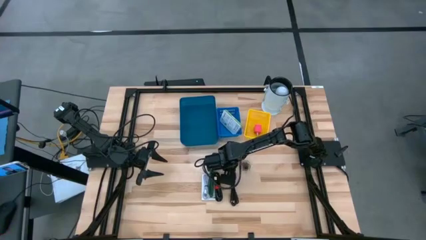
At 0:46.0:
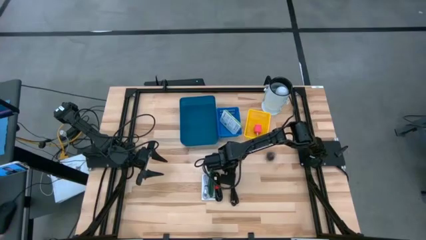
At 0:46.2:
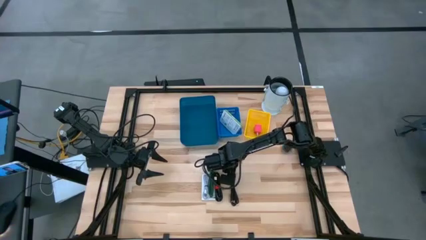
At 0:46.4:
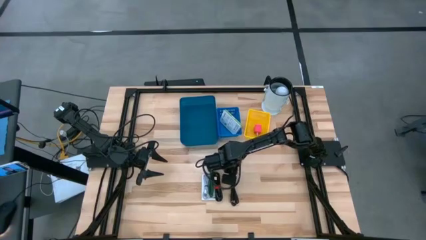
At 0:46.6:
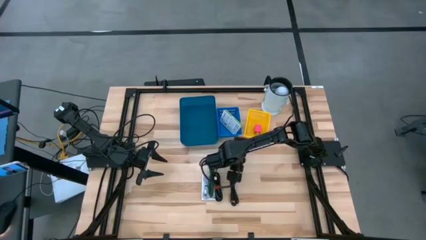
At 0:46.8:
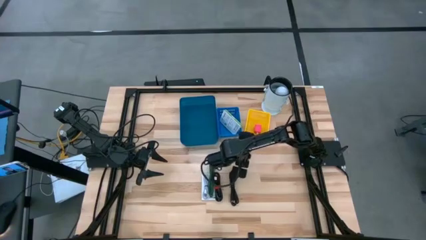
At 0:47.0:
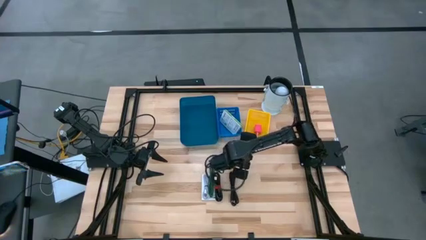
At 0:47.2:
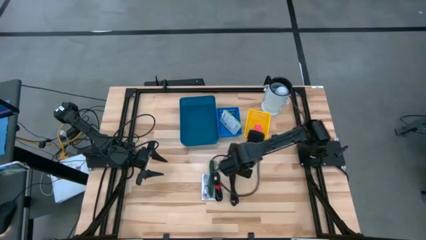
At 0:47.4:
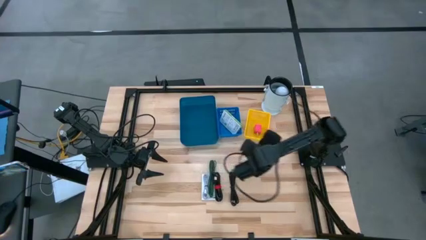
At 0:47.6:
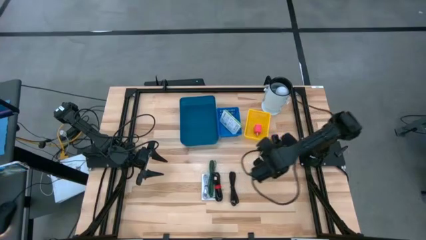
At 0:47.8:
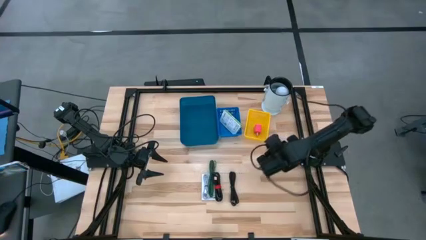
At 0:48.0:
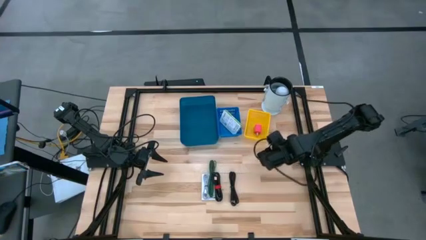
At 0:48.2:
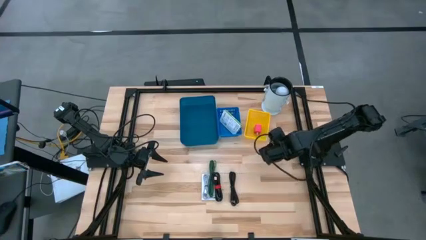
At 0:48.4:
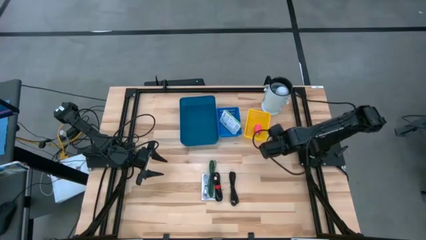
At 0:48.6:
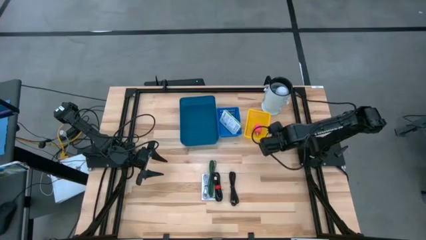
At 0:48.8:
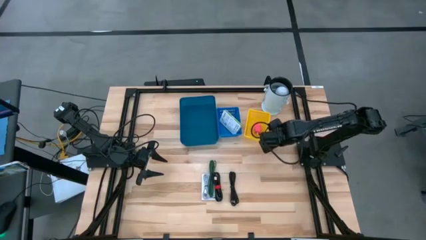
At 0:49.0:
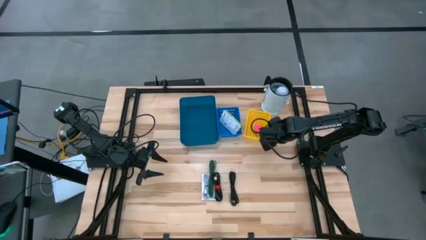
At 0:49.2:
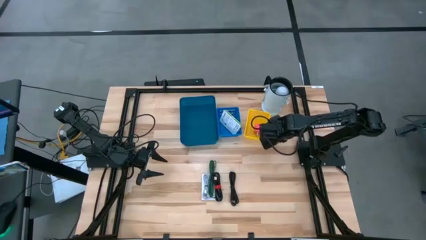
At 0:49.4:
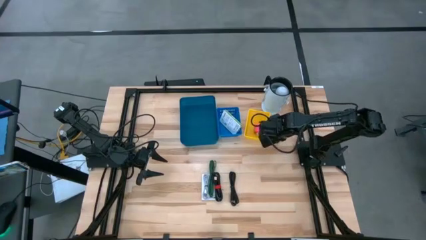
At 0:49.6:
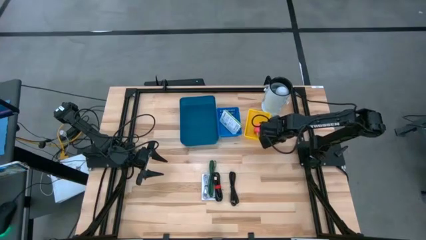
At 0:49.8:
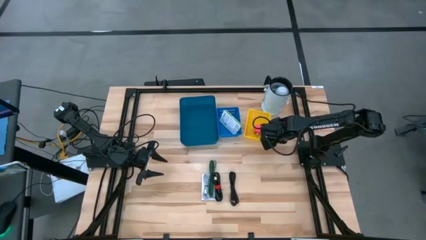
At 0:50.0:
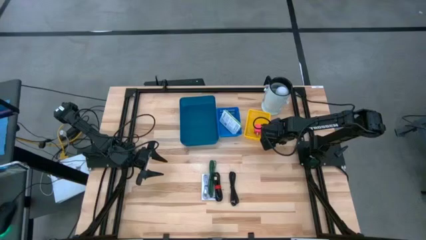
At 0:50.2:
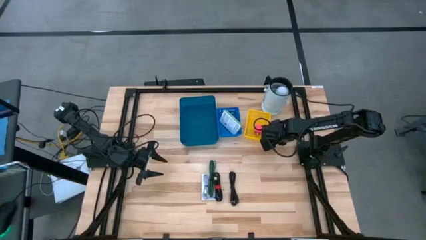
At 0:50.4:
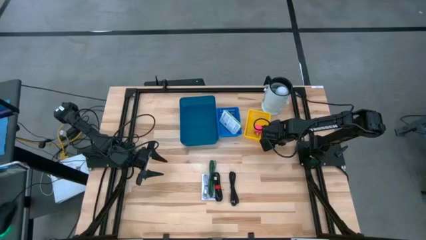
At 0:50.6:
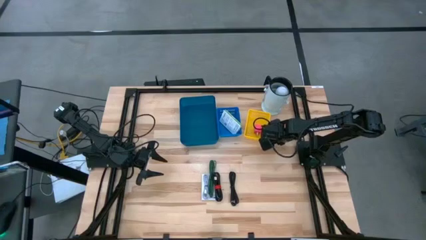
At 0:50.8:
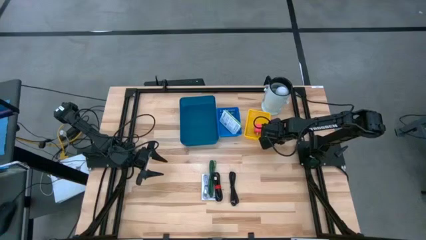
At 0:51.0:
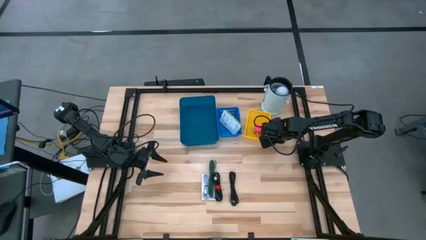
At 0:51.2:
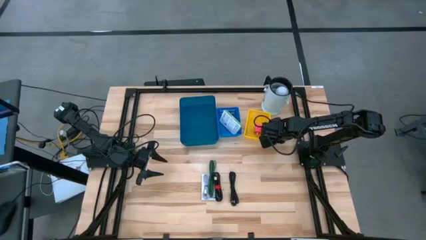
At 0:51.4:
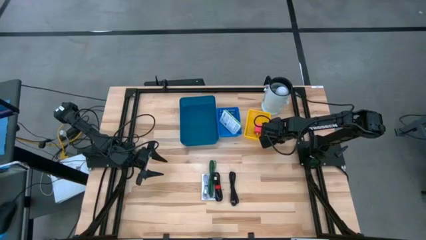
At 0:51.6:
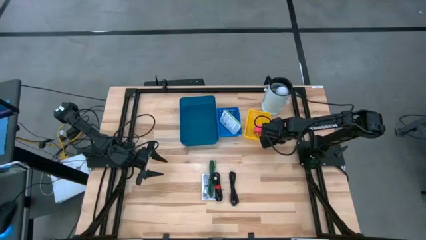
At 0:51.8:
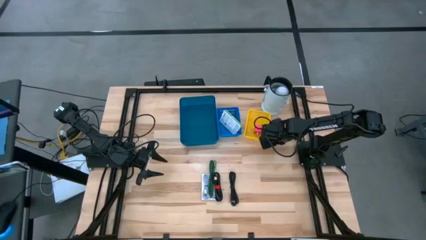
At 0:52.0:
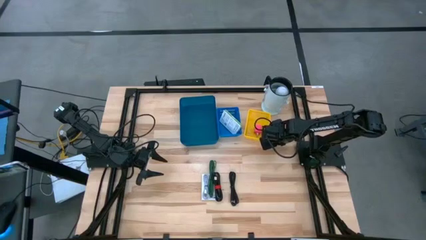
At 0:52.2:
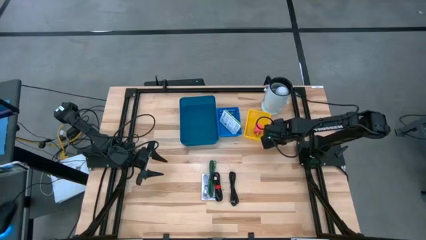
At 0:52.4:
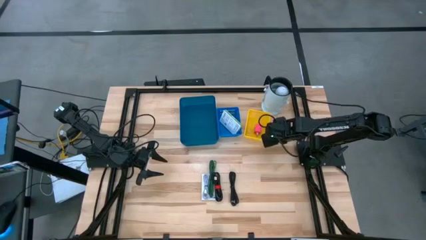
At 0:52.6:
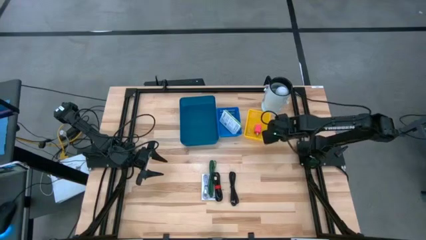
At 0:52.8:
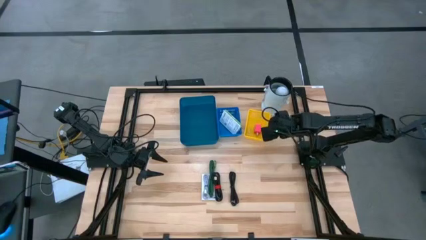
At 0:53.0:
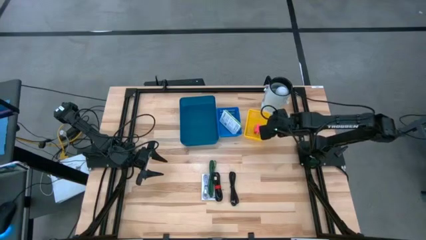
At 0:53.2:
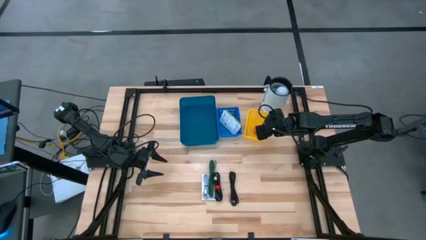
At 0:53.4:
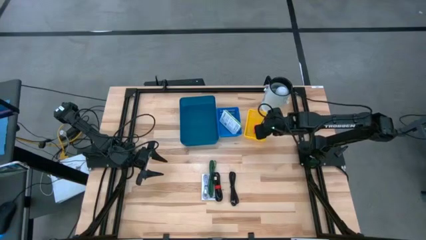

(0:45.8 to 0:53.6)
Task: Pick and place items into bin
Put the black charger adapter into the yellow bin

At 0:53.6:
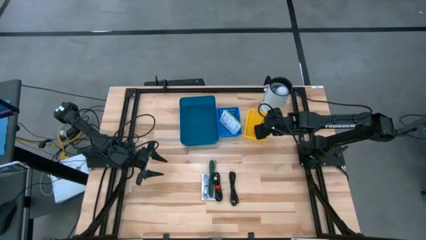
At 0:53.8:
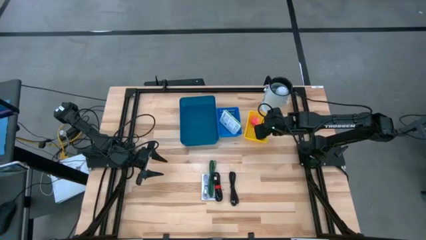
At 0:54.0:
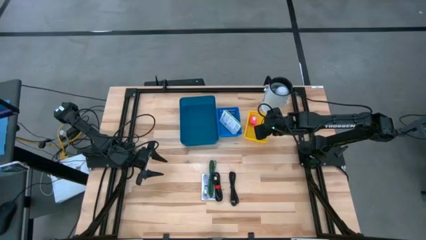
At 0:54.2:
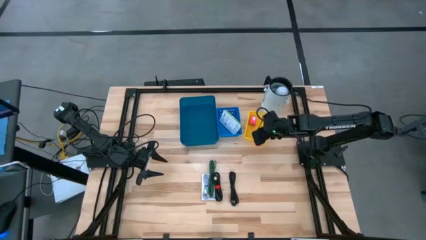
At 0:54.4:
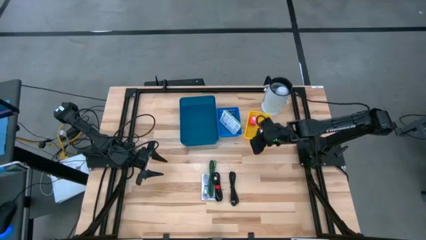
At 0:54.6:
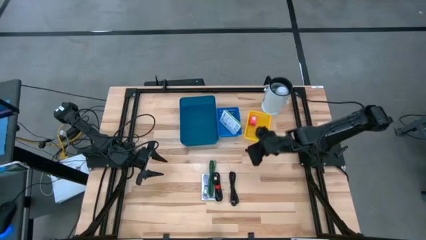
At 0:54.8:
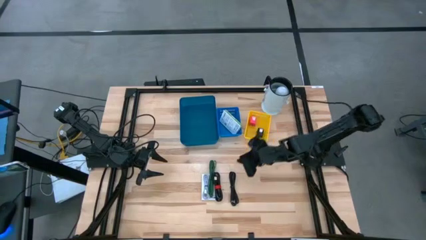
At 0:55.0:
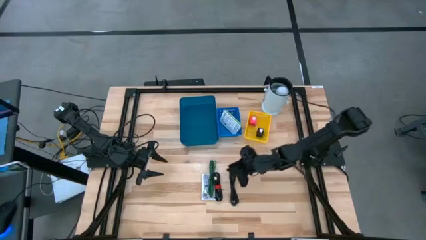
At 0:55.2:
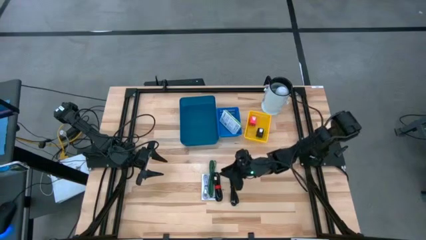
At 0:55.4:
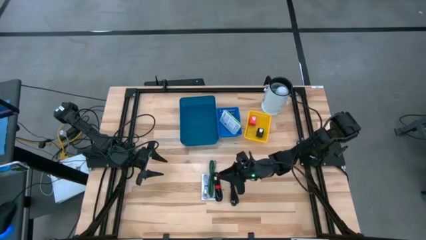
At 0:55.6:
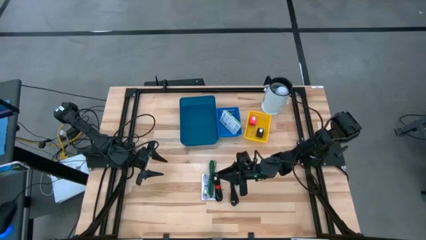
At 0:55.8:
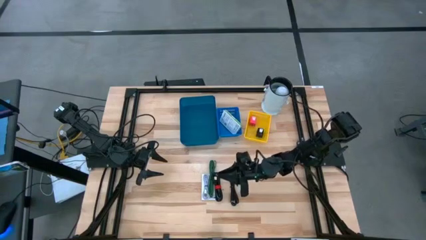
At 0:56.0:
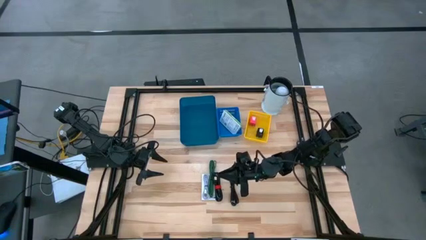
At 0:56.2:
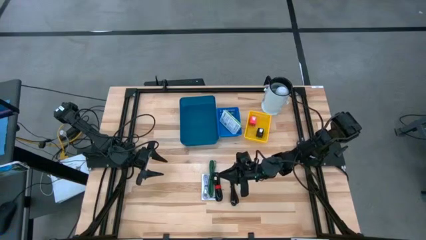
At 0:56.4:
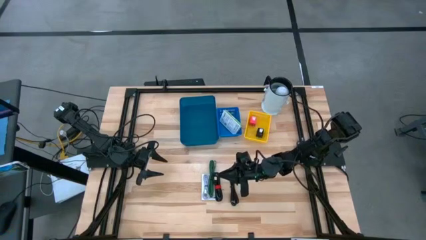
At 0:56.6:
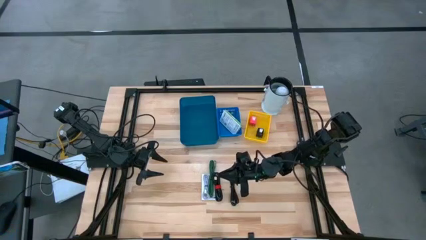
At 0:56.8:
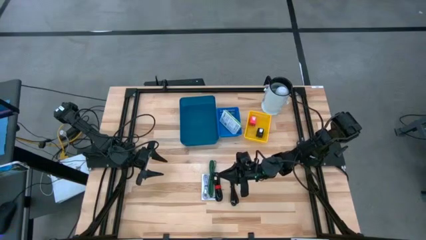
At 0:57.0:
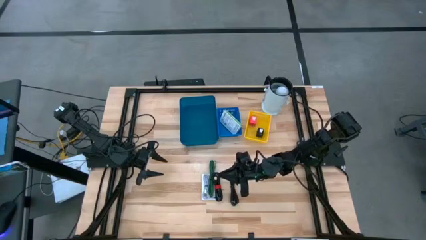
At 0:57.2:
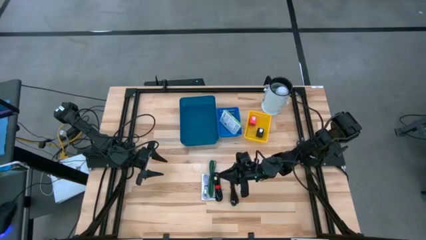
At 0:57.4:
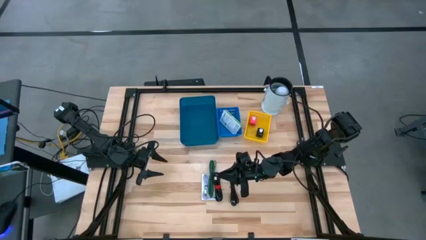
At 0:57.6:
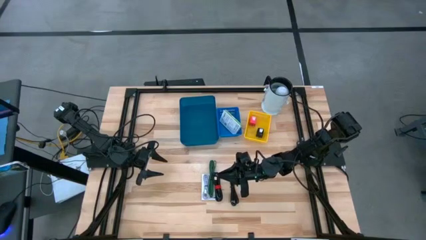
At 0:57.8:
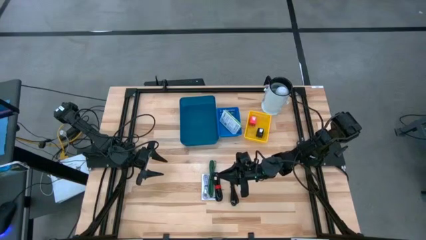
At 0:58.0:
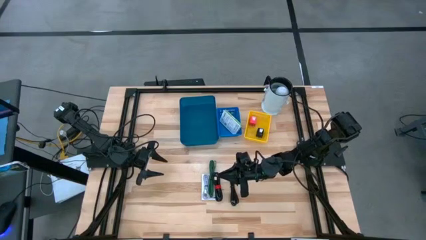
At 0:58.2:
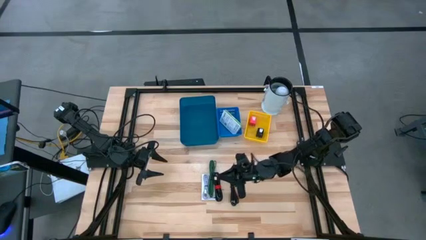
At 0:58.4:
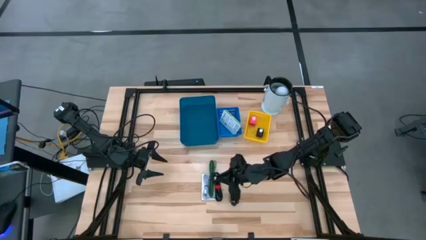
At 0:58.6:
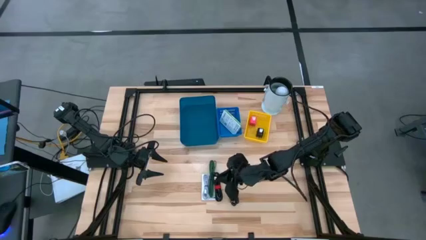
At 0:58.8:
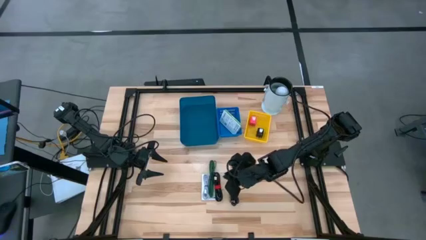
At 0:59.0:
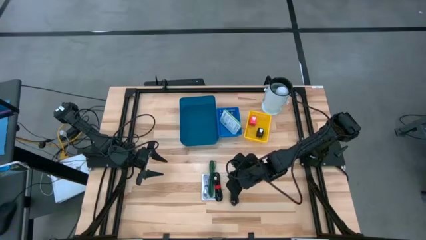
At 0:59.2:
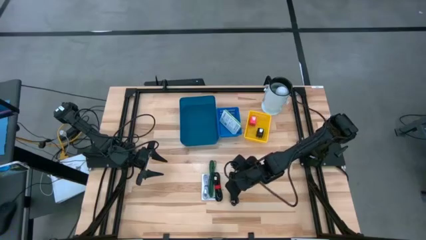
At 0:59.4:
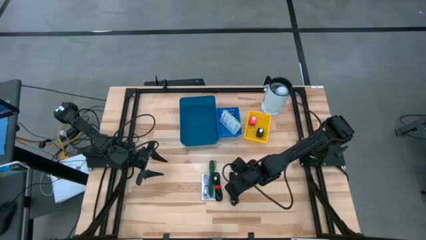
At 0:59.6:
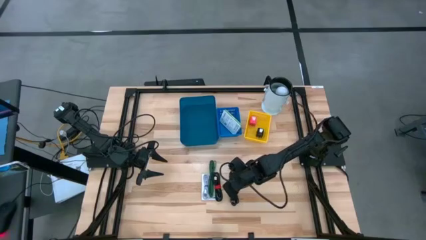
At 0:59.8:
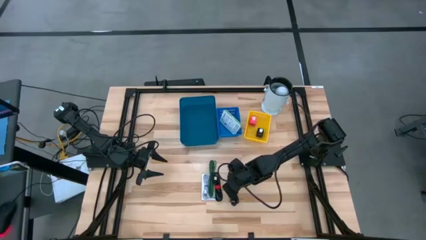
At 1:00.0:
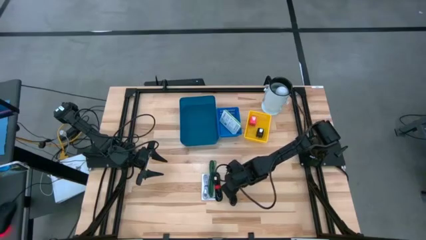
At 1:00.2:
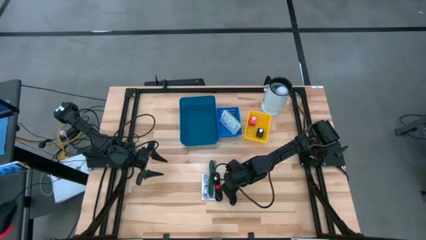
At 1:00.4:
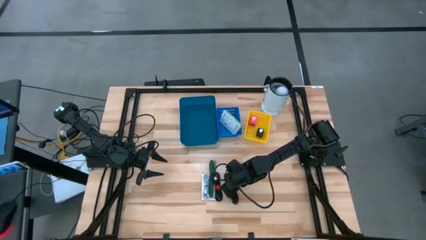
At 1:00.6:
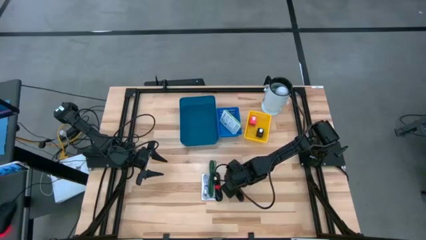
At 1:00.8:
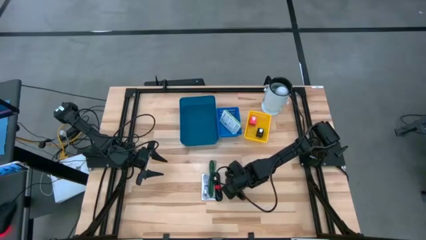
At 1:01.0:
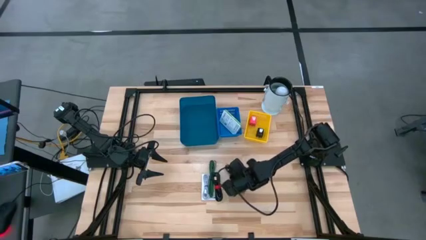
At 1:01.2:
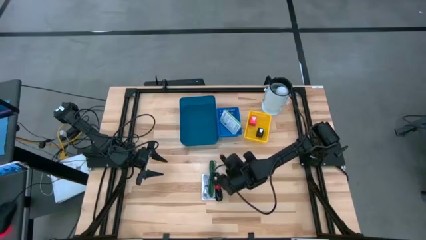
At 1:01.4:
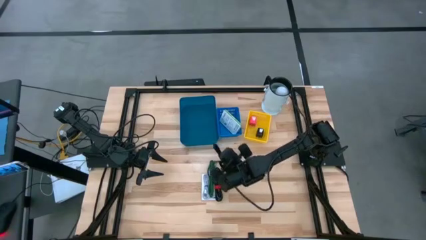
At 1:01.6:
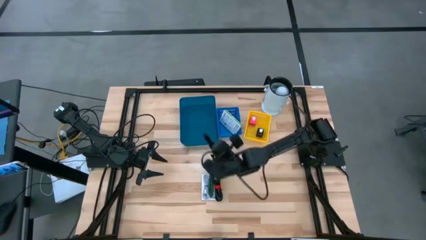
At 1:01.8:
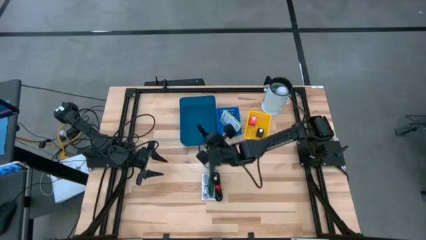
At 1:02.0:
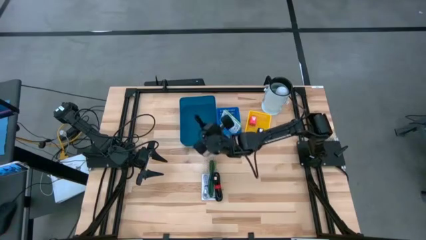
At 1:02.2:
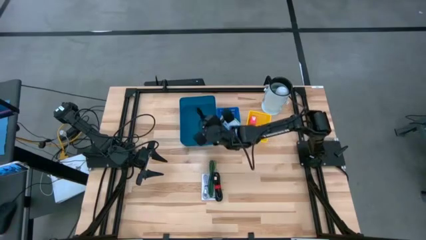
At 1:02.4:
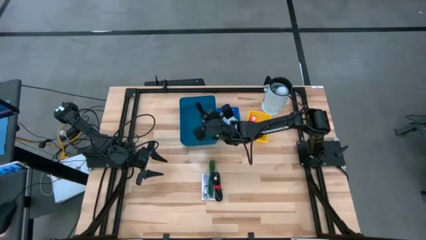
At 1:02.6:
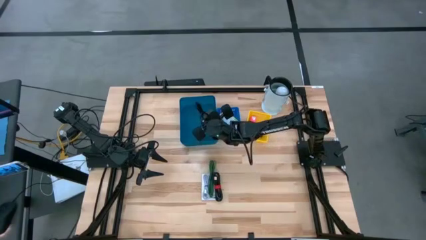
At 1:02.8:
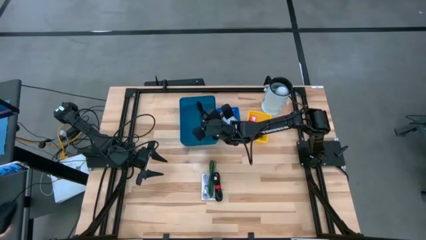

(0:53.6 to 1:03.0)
Put the black charger cable into the dark blue bin
